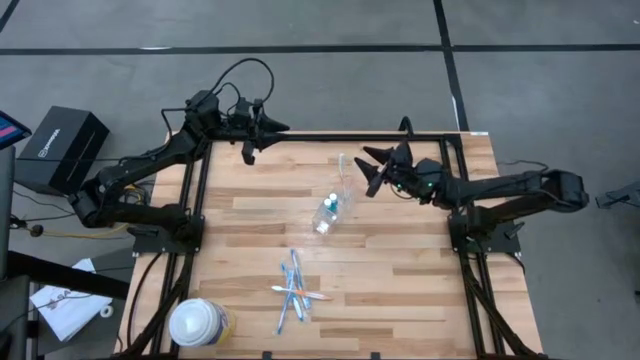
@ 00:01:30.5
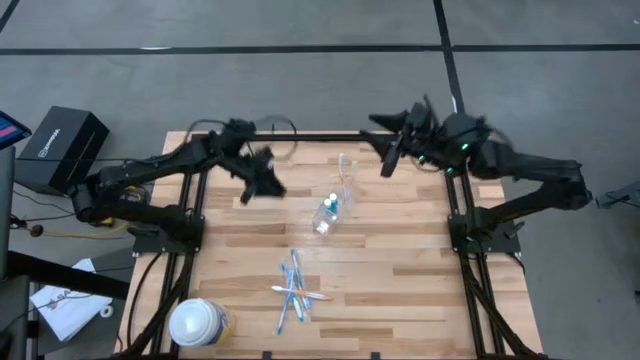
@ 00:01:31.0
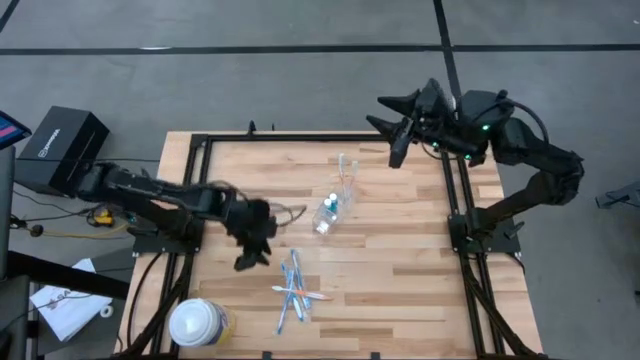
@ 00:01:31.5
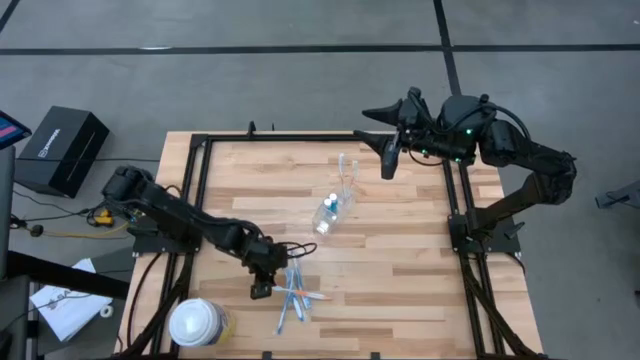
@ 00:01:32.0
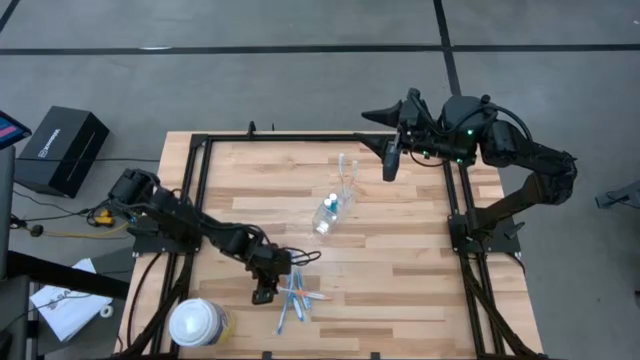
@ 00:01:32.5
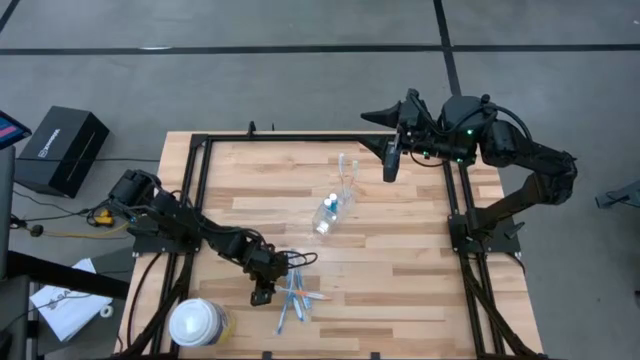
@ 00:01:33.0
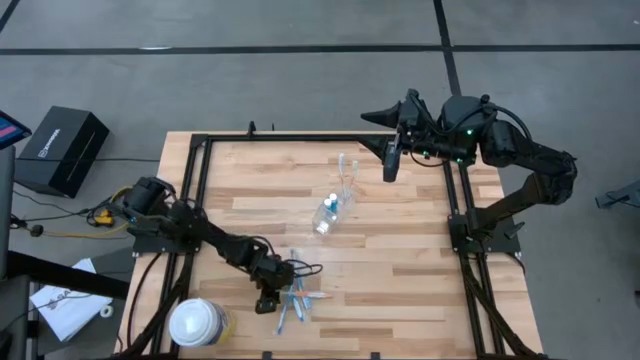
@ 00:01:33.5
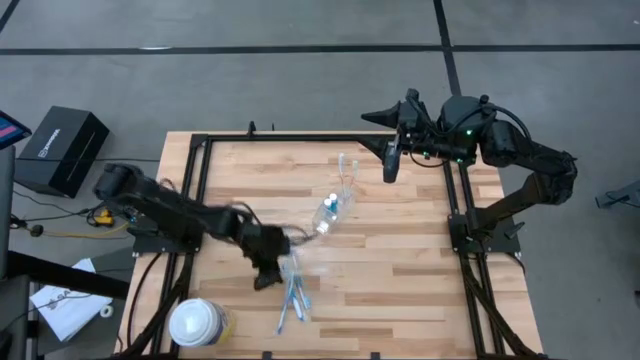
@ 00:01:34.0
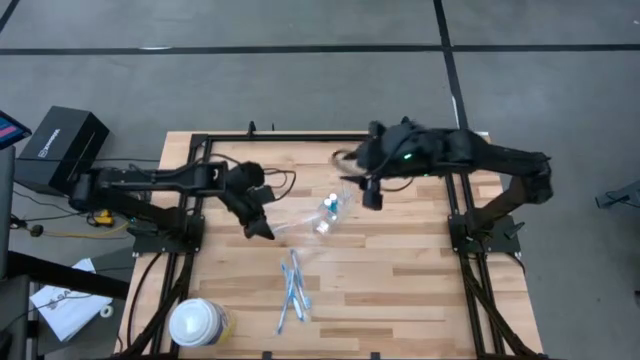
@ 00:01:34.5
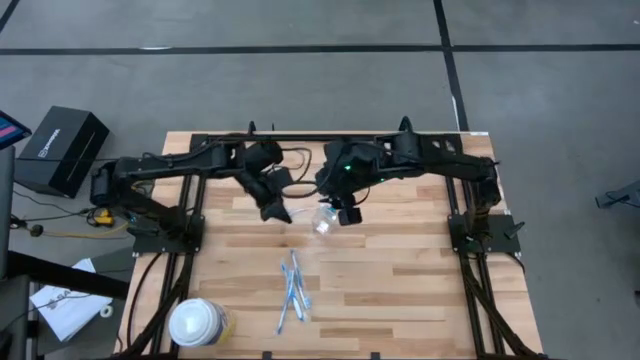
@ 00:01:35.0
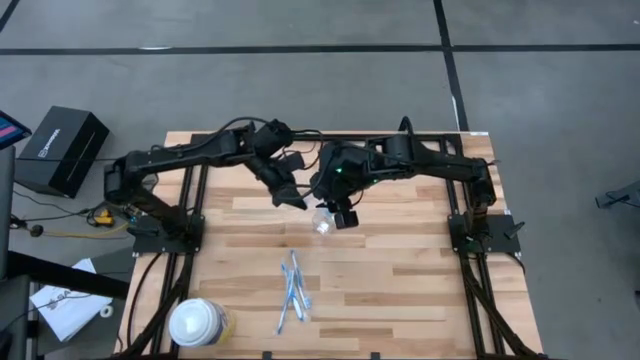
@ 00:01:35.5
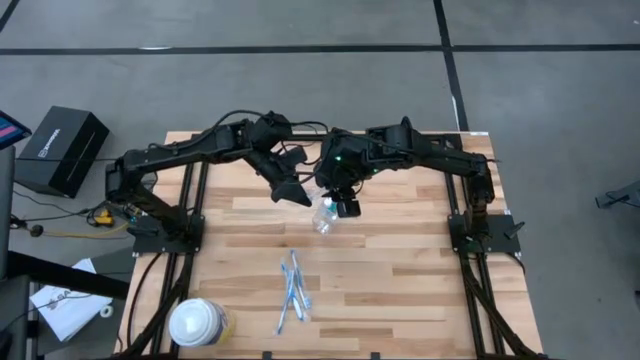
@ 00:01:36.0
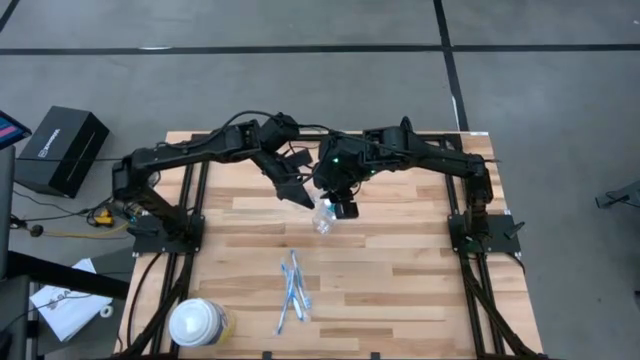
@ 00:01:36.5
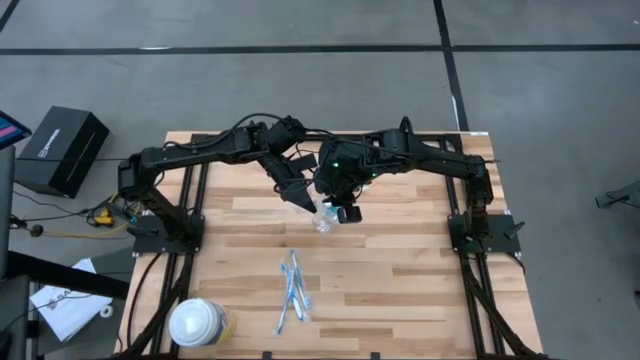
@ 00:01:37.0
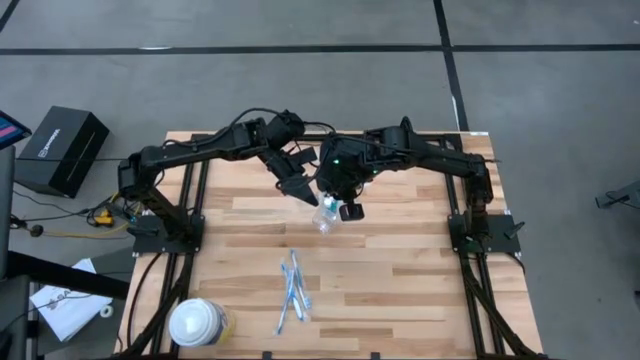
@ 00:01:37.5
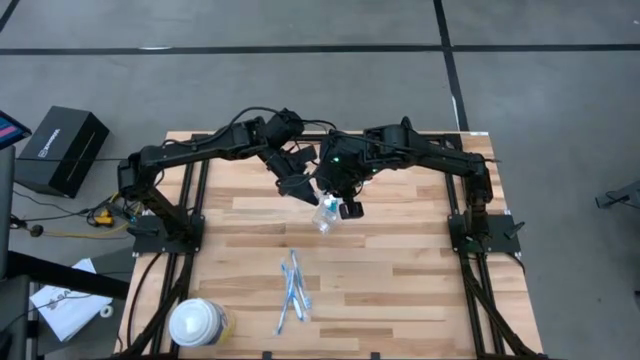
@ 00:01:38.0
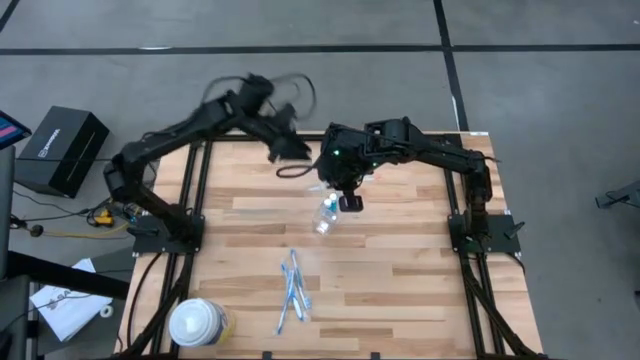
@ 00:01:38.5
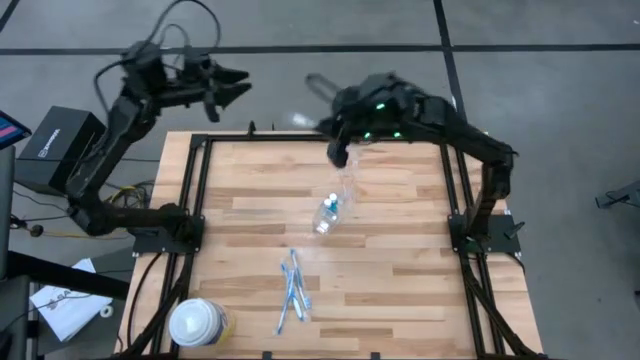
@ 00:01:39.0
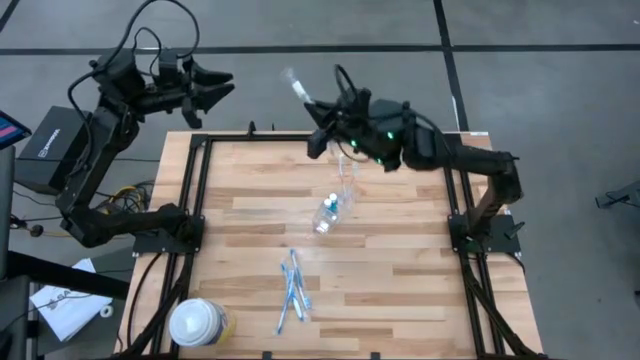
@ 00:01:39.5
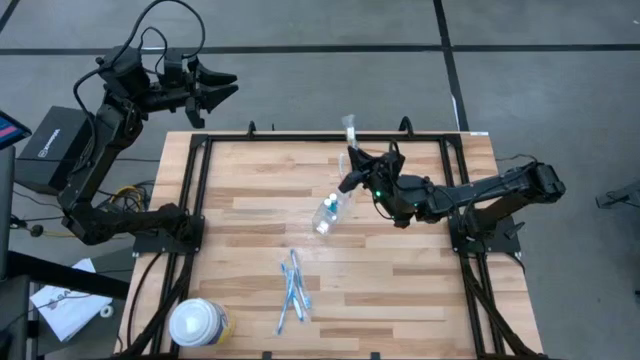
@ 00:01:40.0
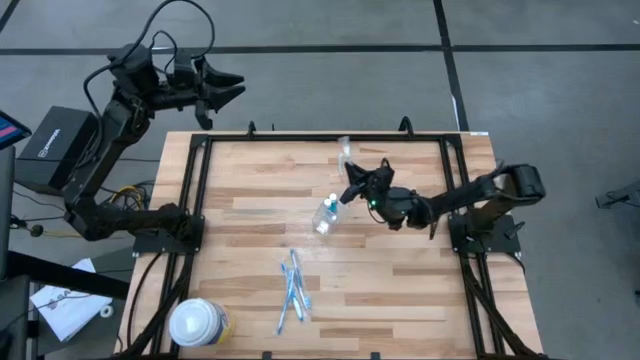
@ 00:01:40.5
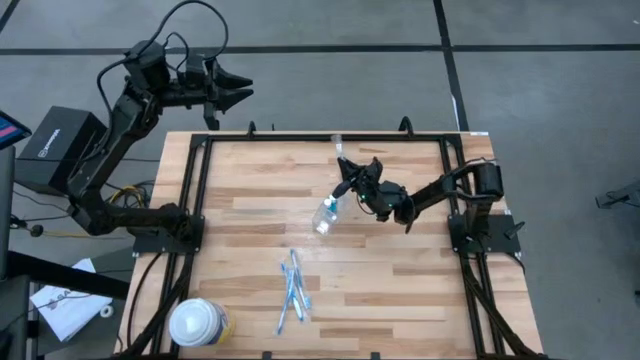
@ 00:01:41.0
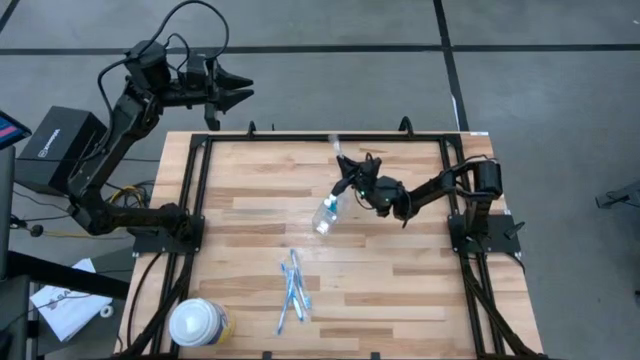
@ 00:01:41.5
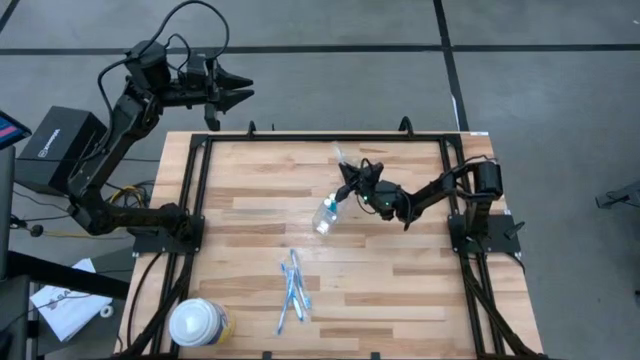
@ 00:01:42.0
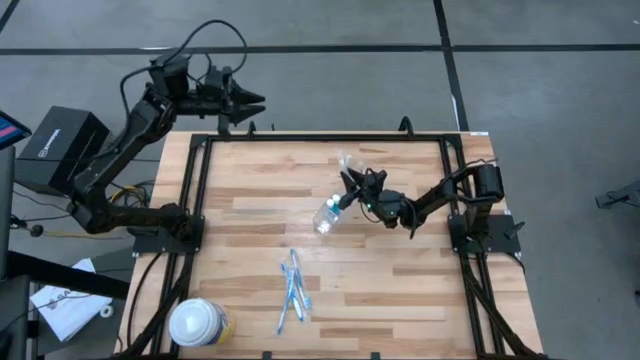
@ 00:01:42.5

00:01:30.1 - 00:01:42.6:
Task: Pick & Place toothbrushing station
Put the orange toothbrush into the right section of the transparent organizer

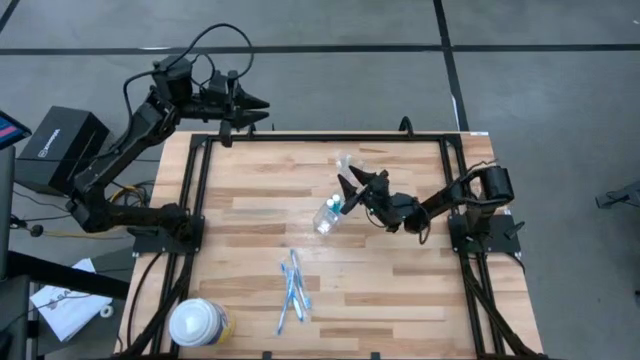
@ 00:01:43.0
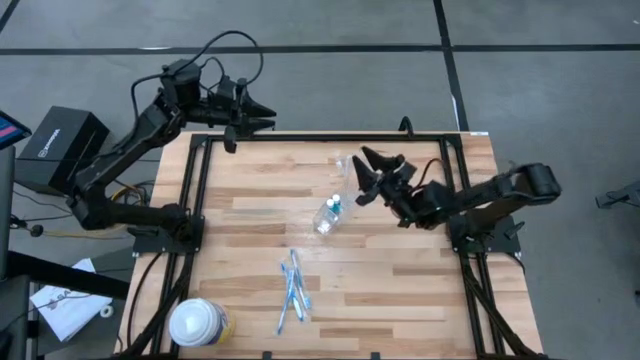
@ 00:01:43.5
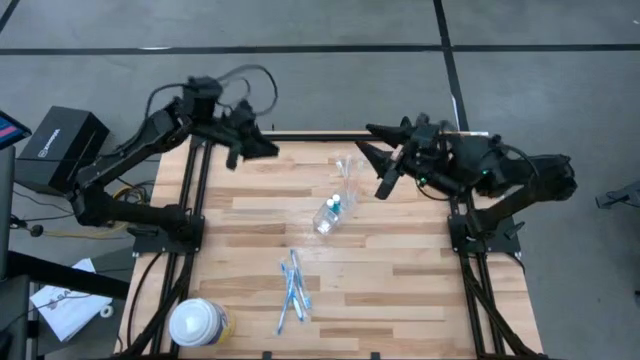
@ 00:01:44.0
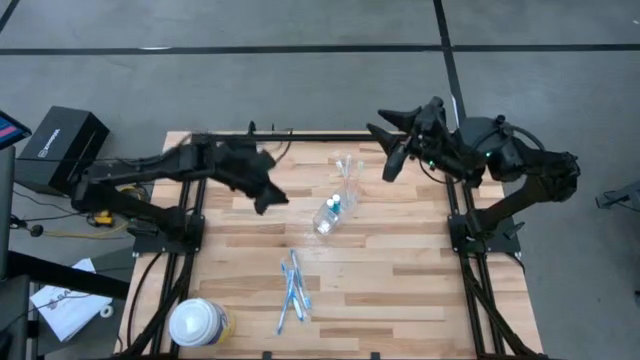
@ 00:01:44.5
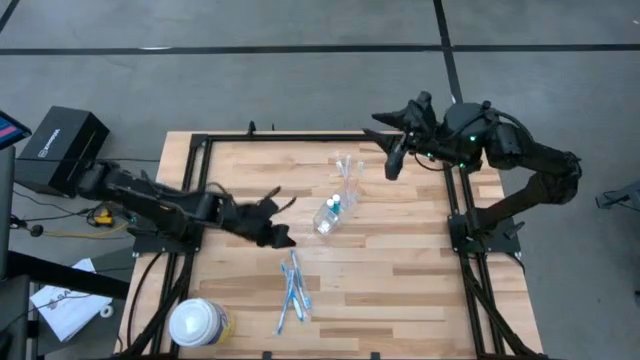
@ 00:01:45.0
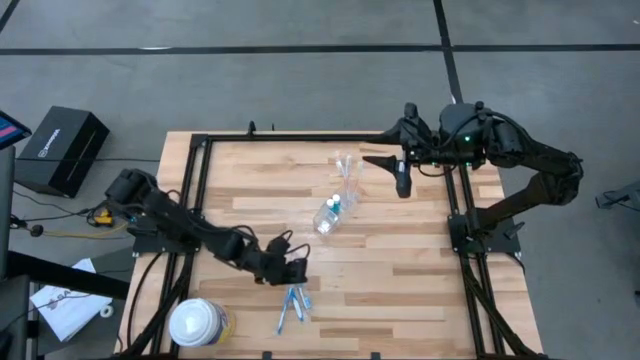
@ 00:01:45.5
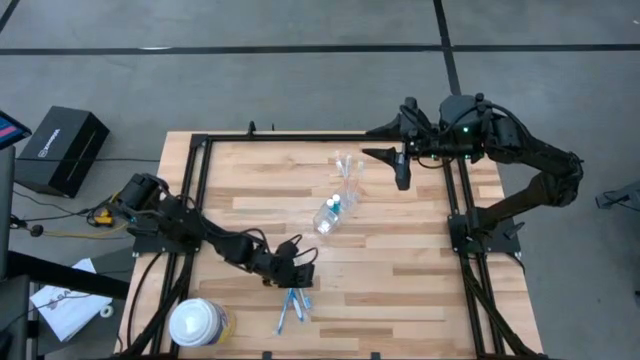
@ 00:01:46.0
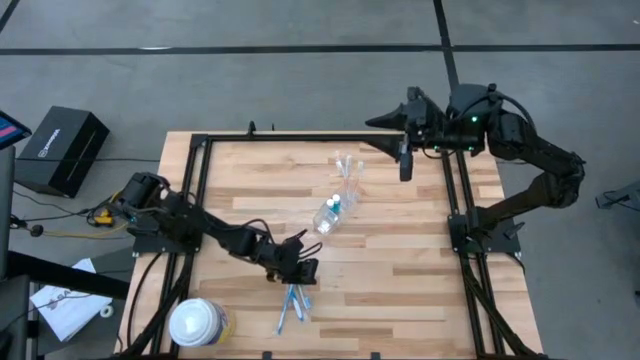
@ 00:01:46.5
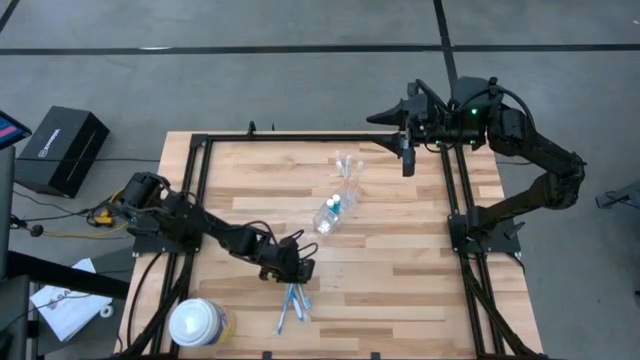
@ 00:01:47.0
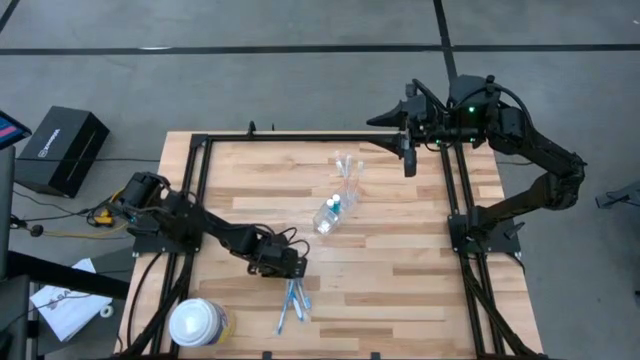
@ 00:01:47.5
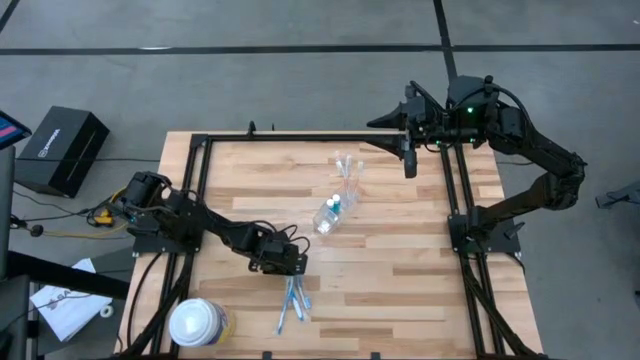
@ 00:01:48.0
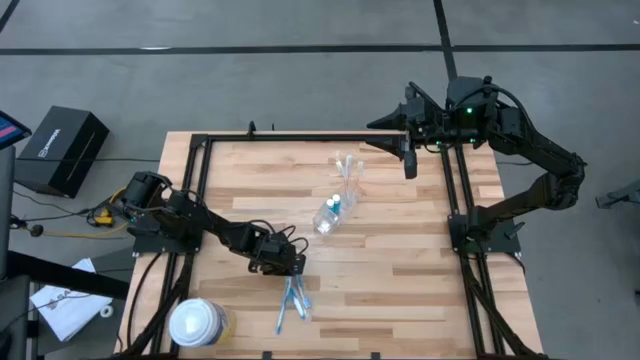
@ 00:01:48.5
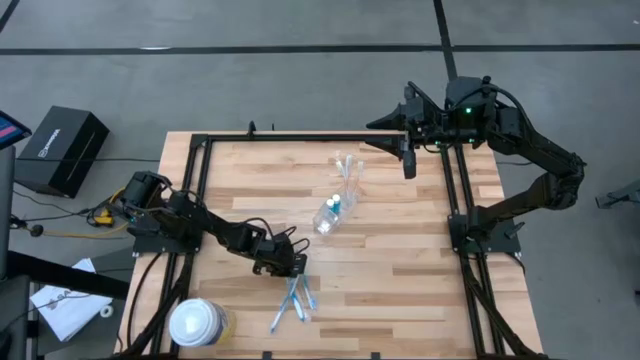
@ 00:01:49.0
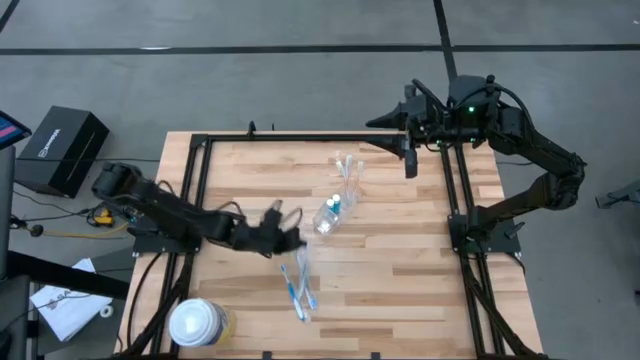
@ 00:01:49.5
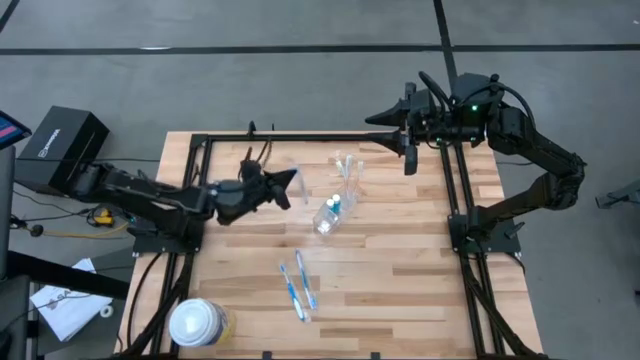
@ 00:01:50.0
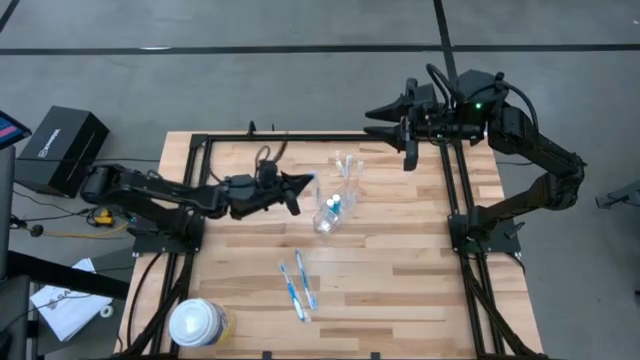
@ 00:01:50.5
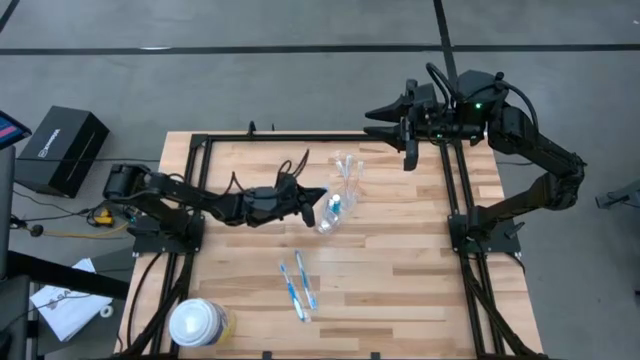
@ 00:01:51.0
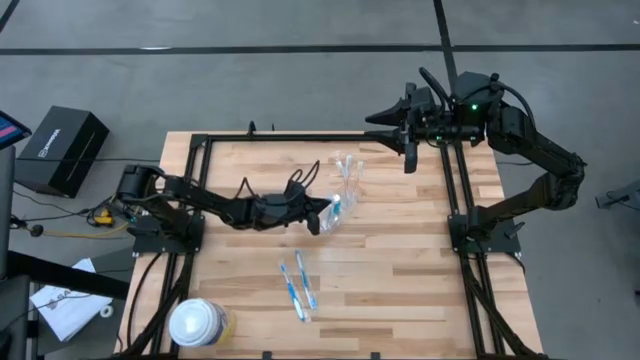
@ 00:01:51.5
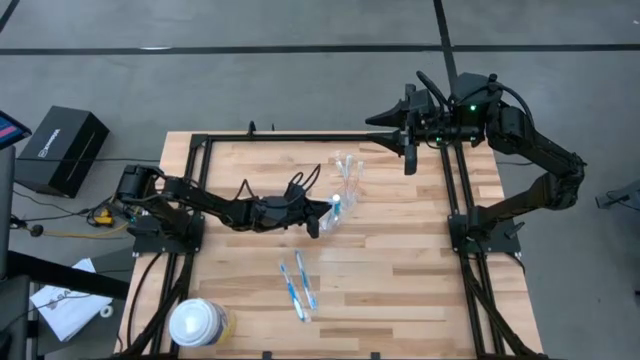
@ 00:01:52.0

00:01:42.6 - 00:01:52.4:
Put the left blue toothbrush into the left section of the transparent organizer
